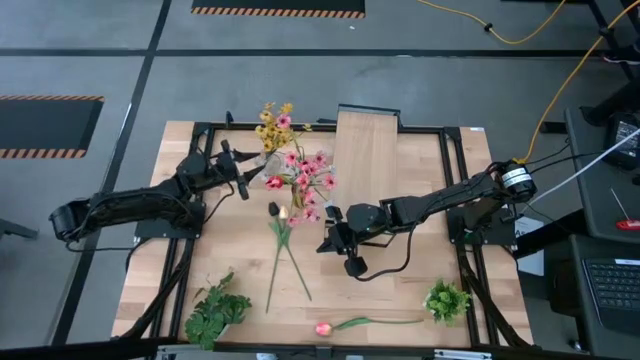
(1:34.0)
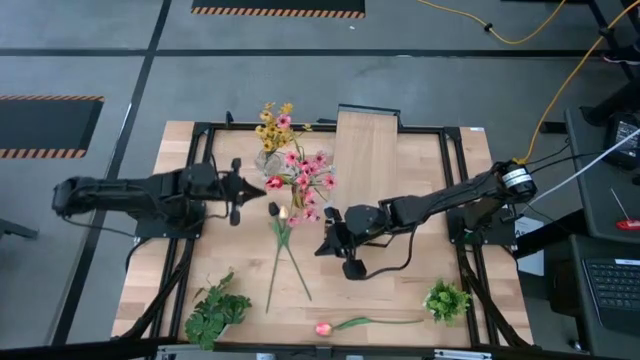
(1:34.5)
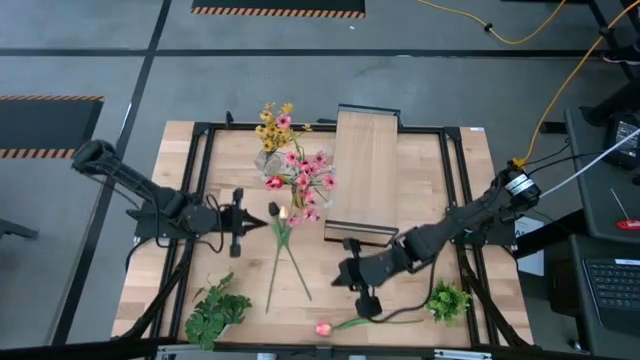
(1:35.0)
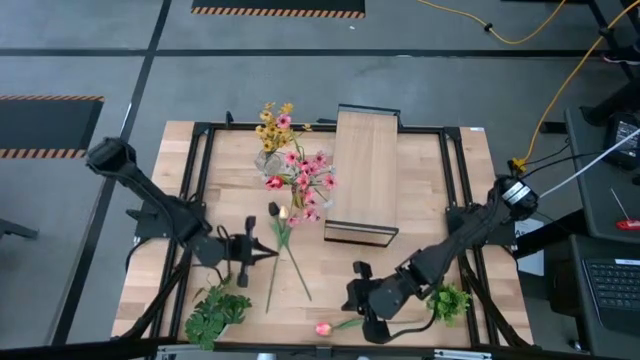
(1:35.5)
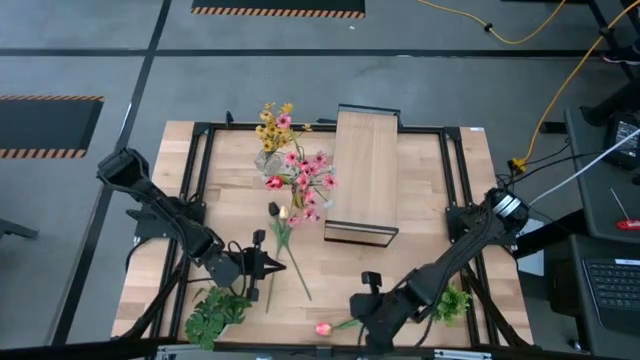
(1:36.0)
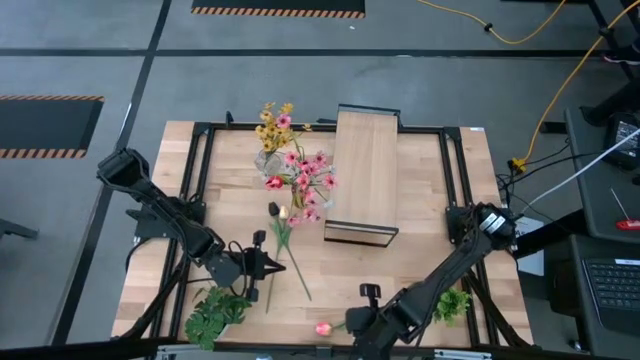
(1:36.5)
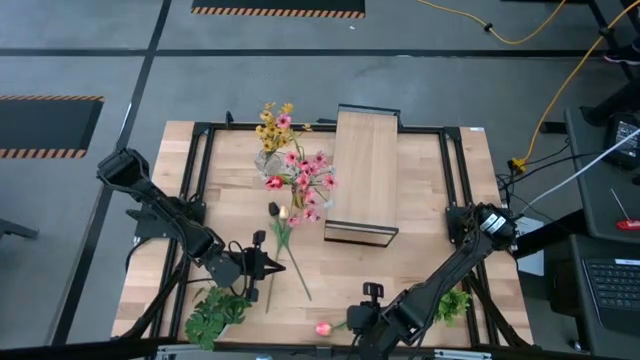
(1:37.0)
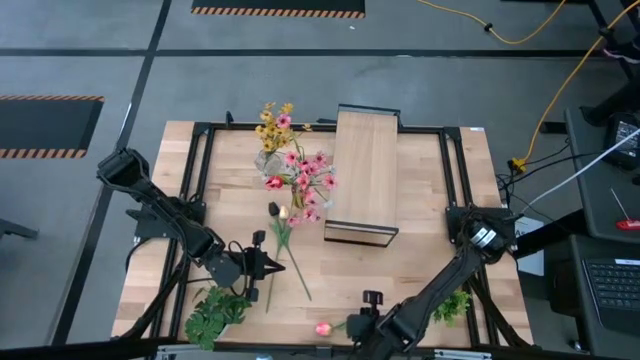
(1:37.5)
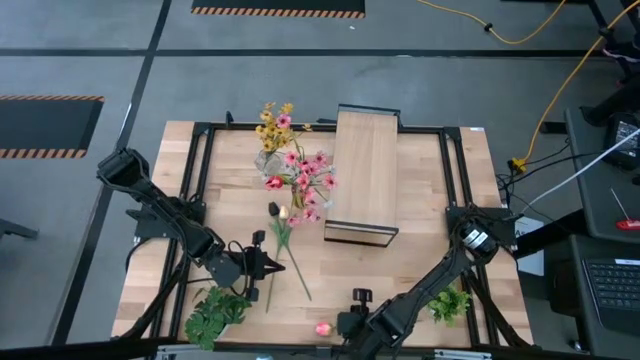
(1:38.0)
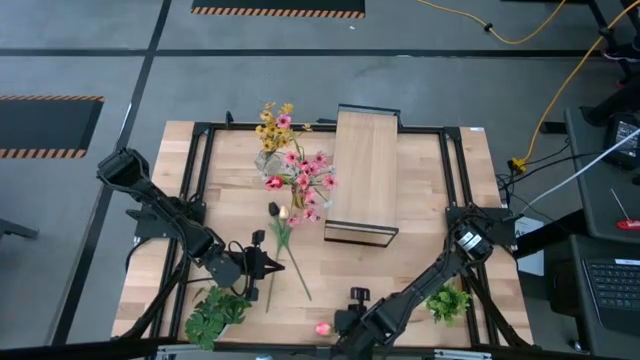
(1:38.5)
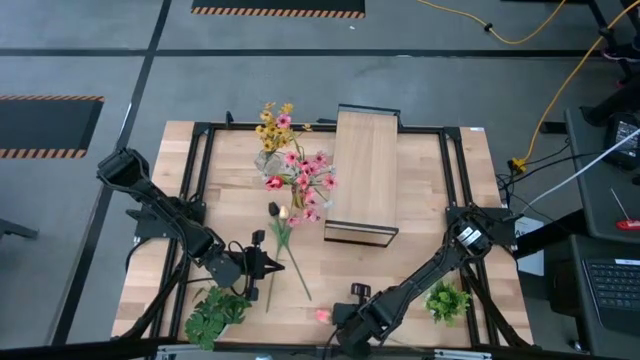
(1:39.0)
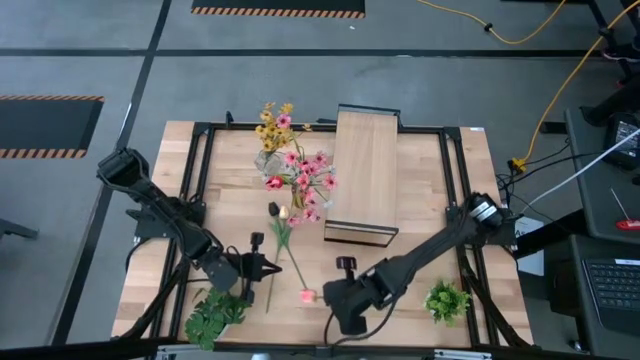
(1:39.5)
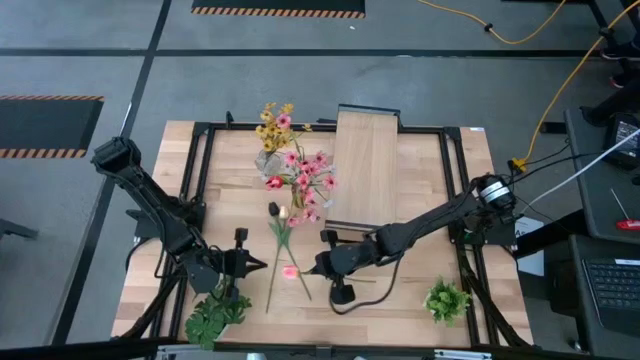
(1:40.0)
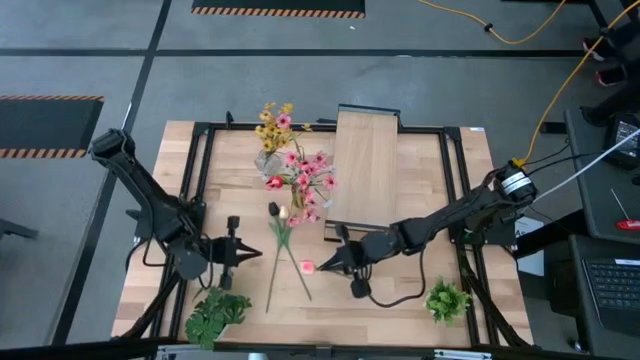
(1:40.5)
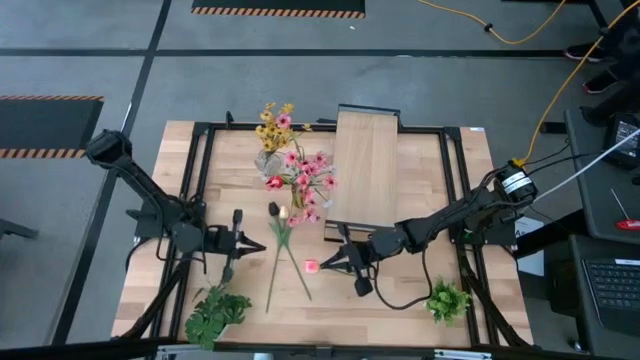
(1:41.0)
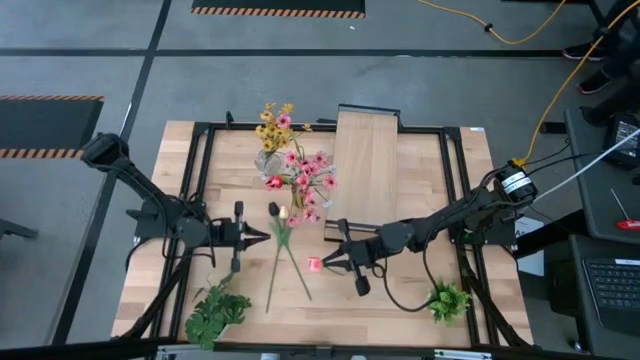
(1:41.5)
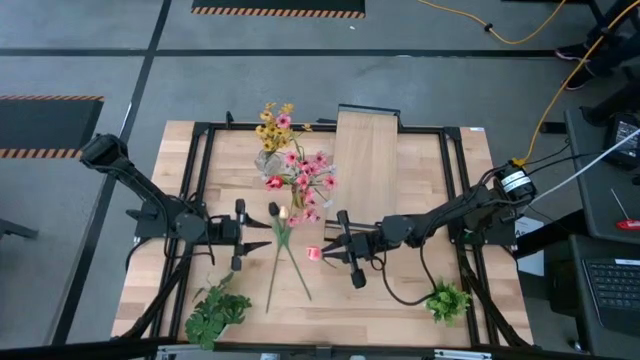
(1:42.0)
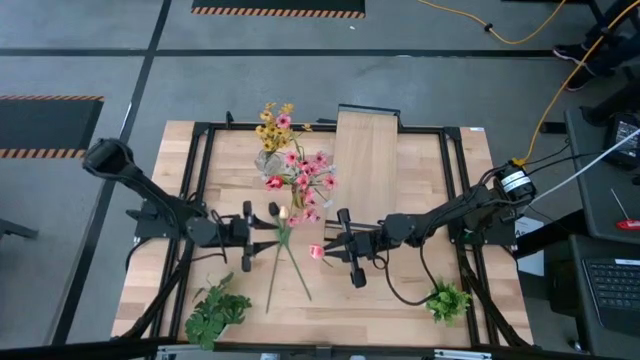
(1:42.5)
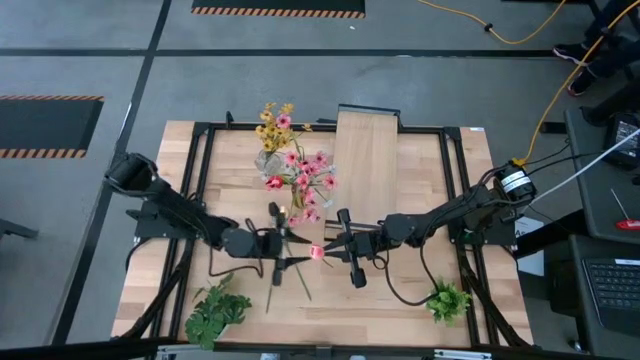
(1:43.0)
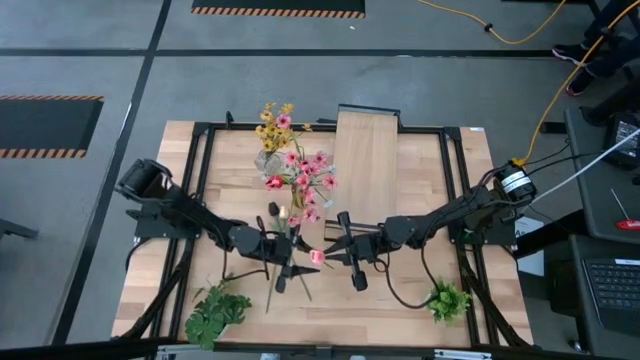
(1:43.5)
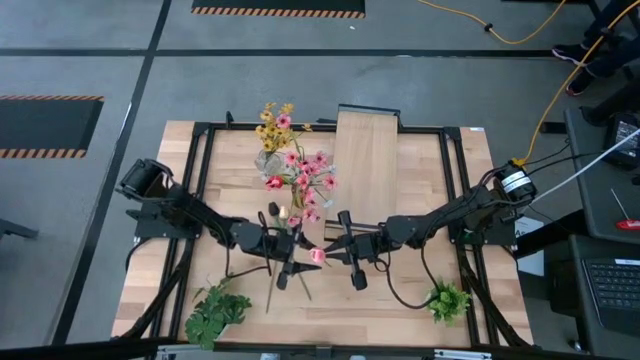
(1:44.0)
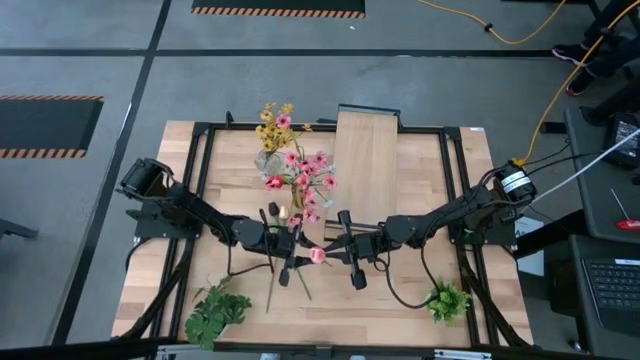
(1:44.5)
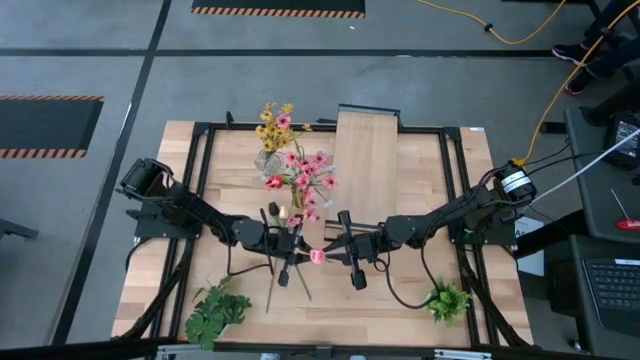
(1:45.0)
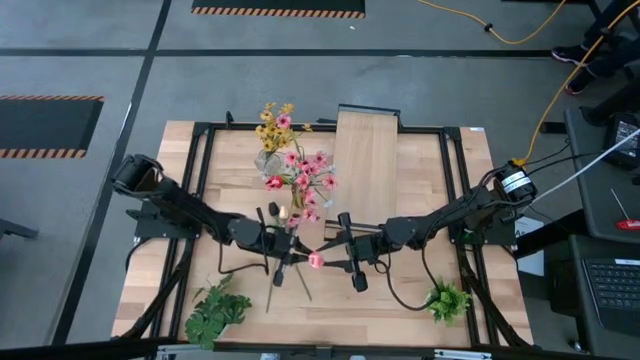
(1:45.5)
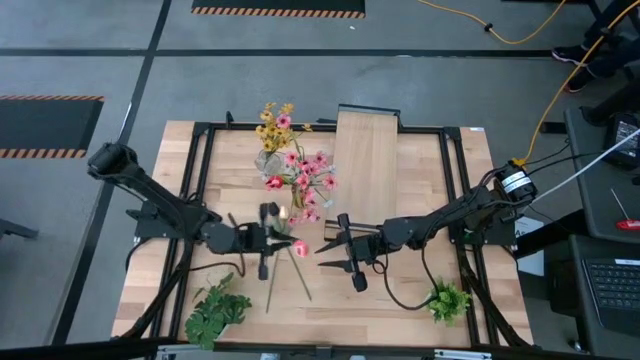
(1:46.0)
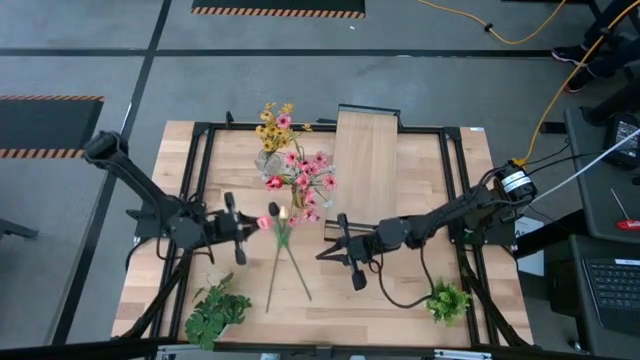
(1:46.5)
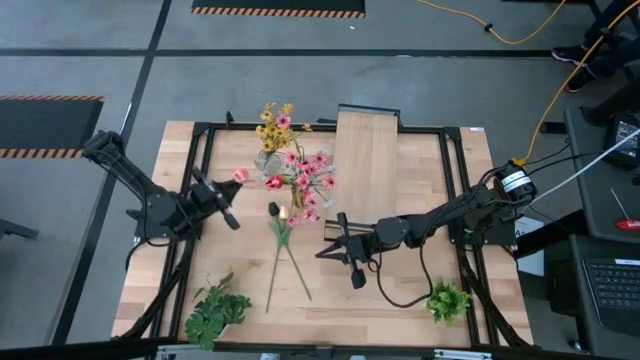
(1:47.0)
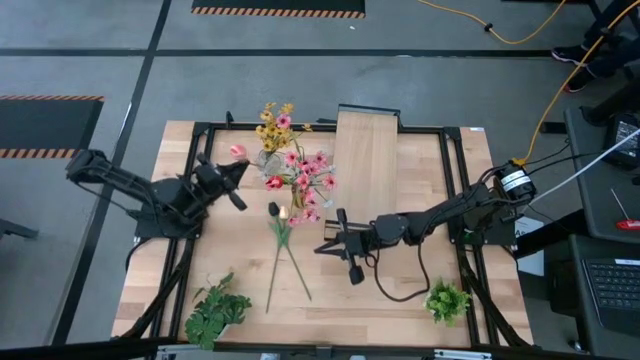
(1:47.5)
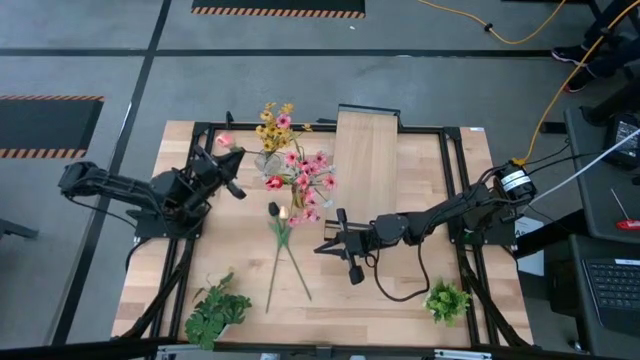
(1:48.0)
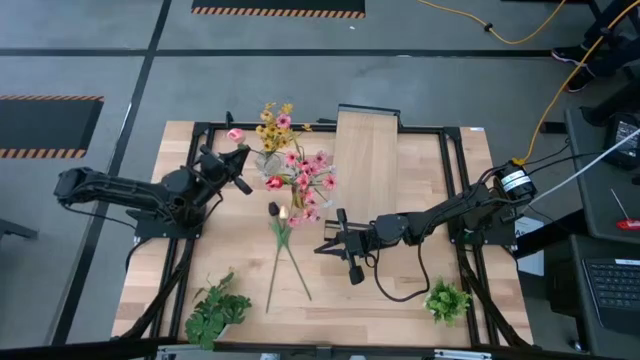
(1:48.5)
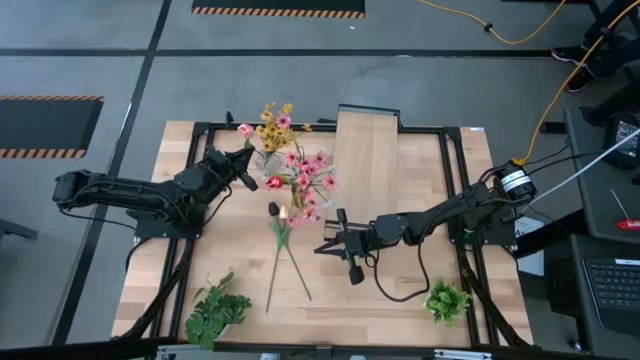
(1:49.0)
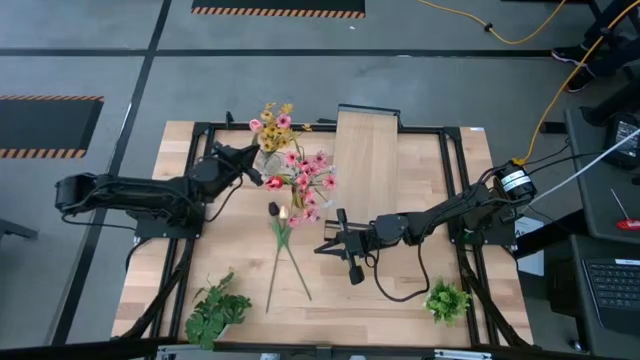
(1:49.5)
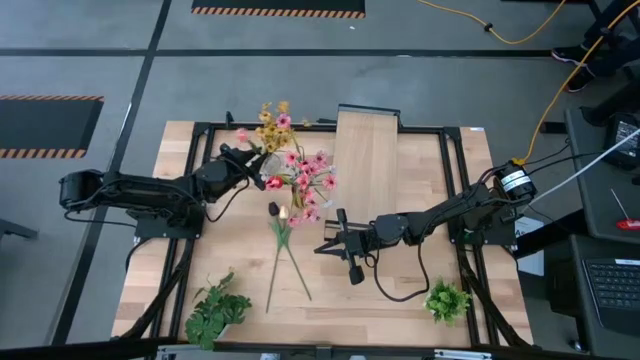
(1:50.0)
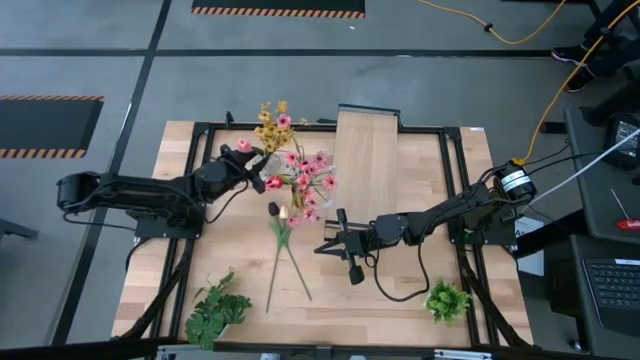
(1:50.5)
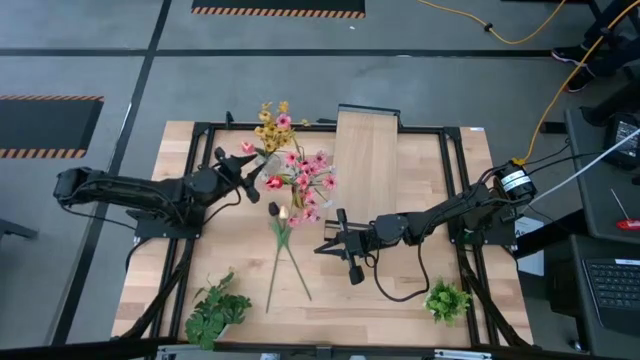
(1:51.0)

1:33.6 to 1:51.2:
Task: Pick and place flowers into a vace then onto a shelf
Put the pink tulip into the transparent vase

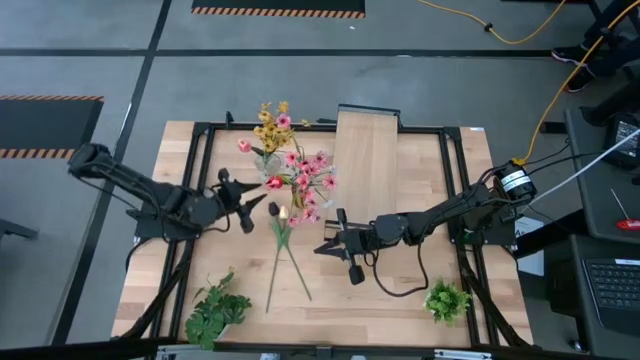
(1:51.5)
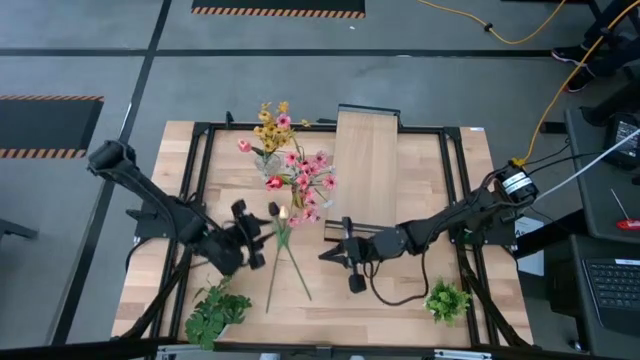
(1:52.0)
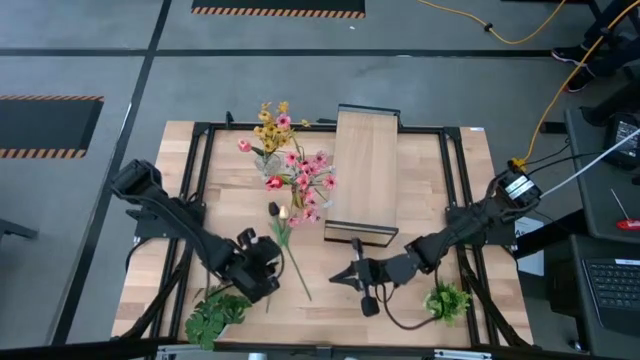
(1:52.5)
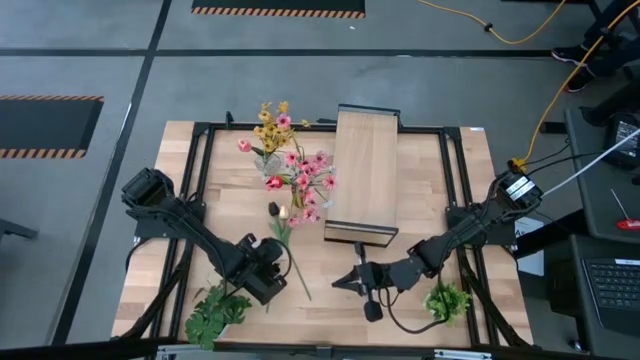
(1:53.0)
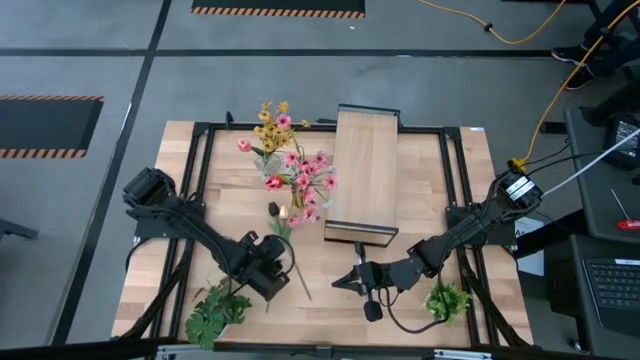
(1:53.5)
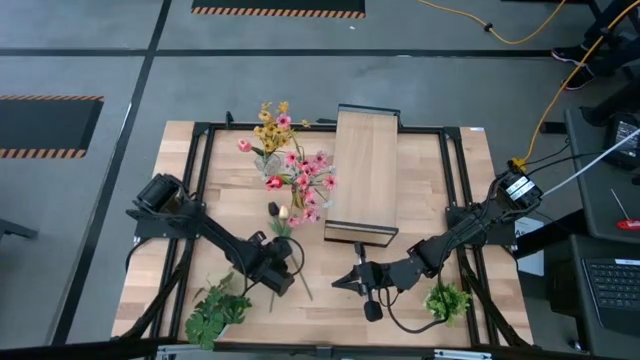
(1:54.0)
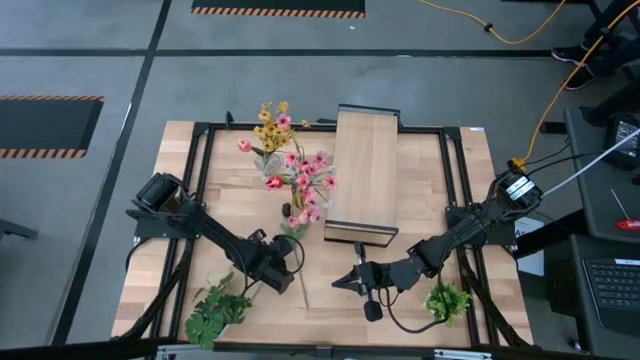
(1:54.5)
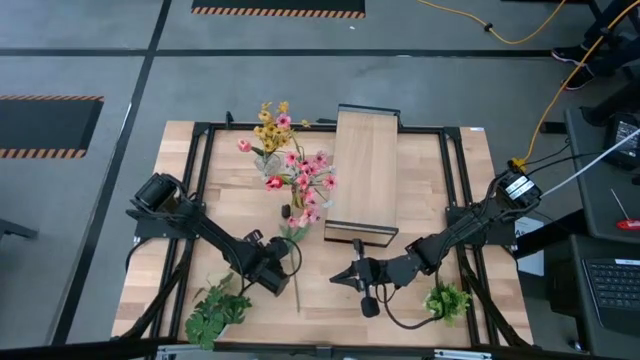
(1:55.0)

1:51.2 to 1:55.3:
Put the light yellow tulip into the transparent vase
